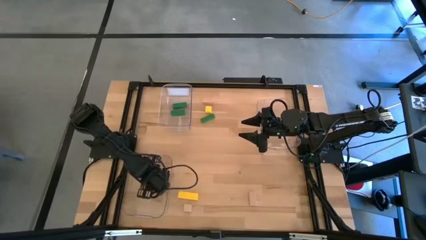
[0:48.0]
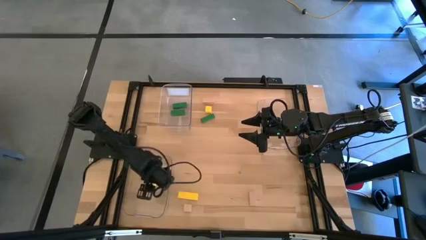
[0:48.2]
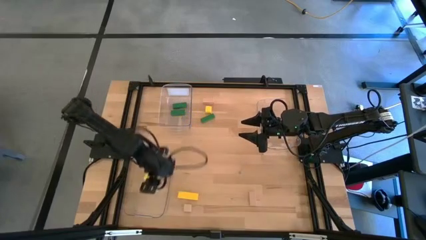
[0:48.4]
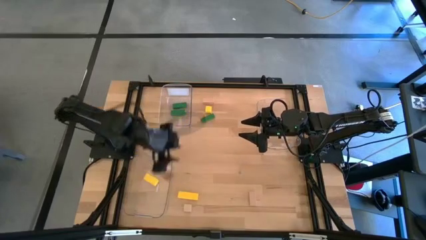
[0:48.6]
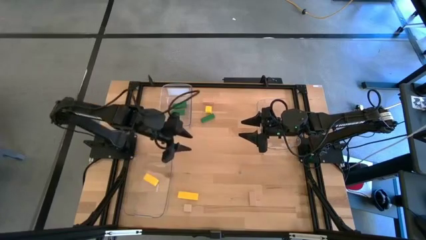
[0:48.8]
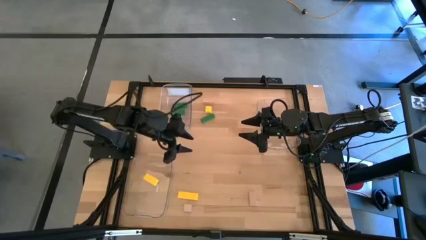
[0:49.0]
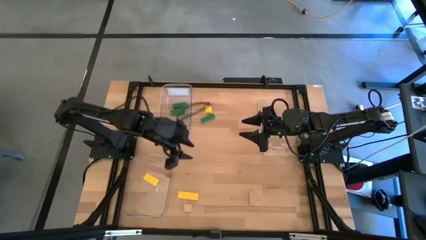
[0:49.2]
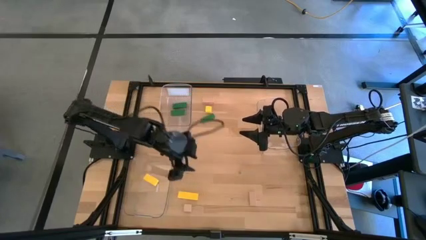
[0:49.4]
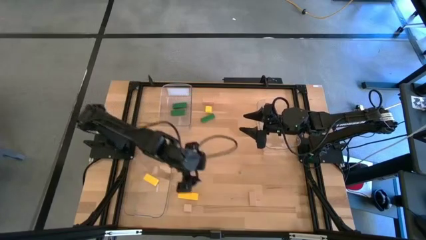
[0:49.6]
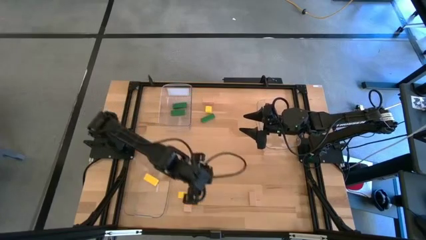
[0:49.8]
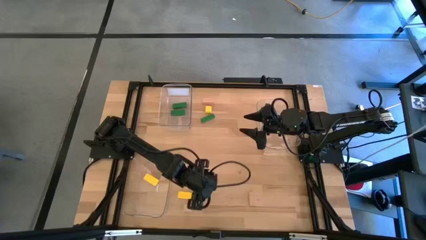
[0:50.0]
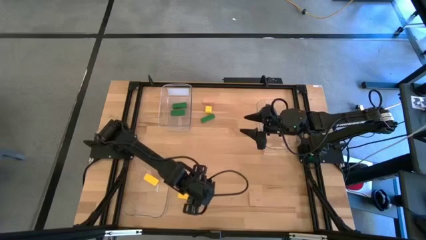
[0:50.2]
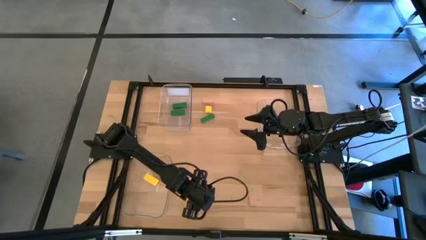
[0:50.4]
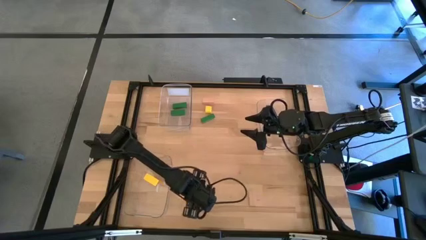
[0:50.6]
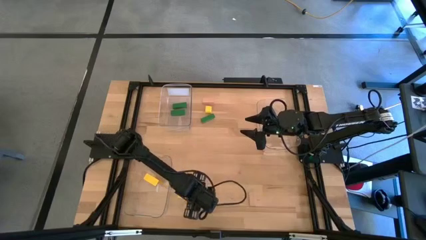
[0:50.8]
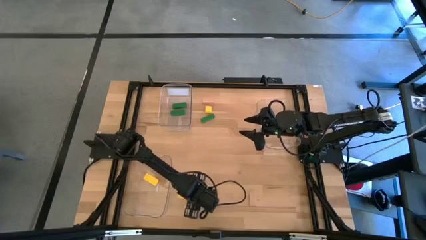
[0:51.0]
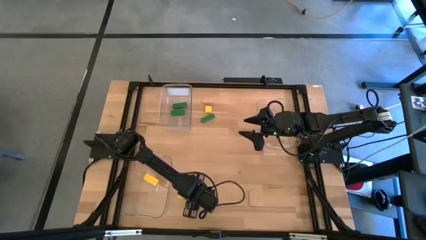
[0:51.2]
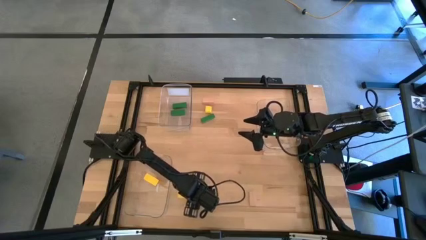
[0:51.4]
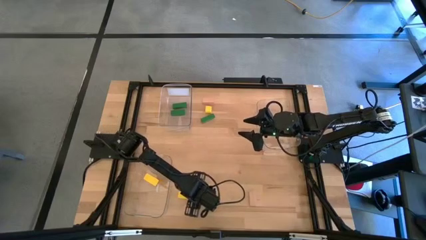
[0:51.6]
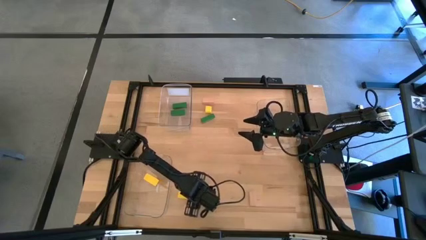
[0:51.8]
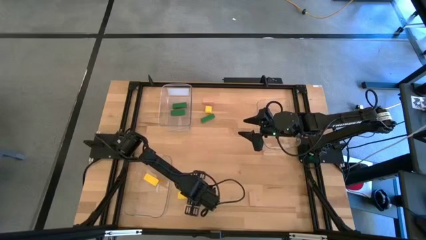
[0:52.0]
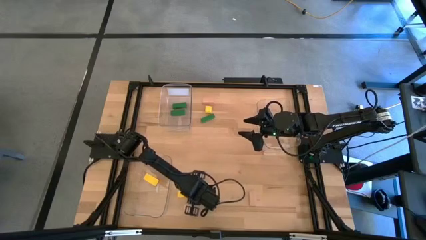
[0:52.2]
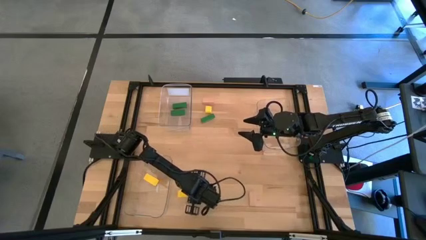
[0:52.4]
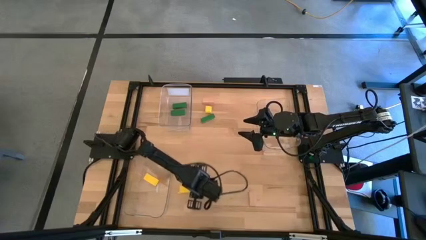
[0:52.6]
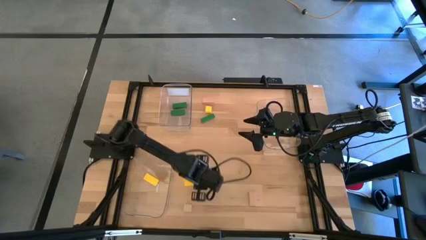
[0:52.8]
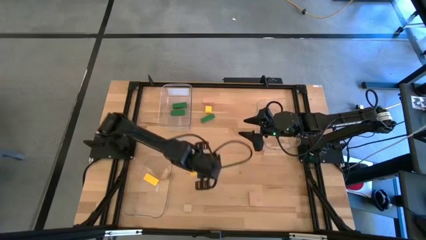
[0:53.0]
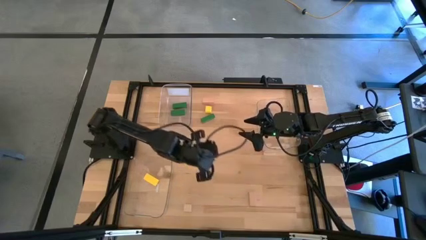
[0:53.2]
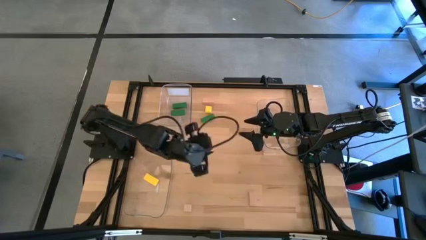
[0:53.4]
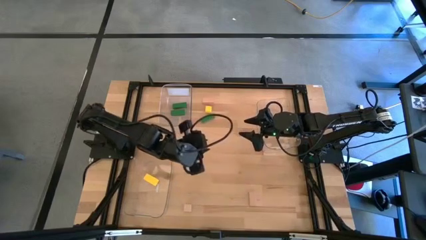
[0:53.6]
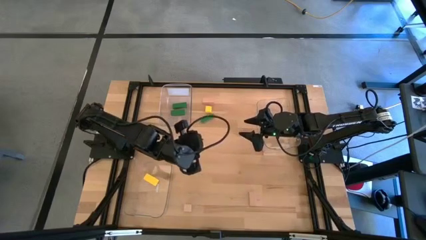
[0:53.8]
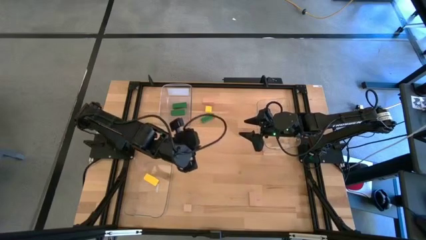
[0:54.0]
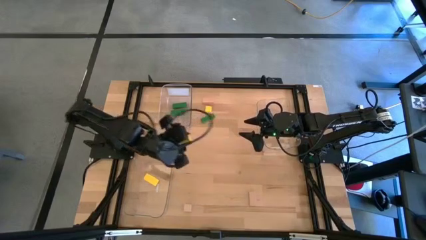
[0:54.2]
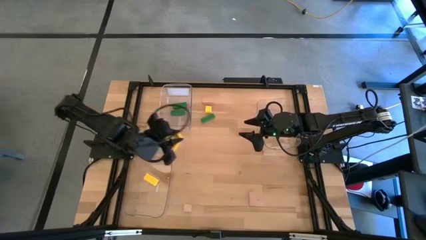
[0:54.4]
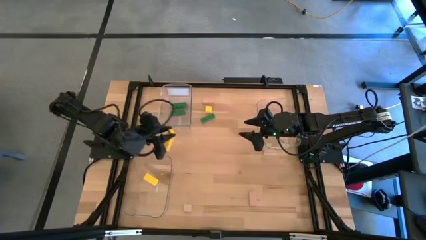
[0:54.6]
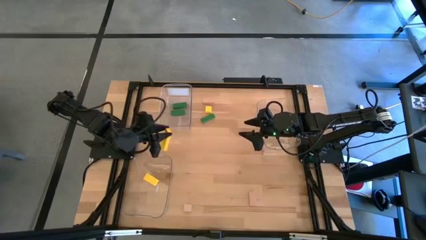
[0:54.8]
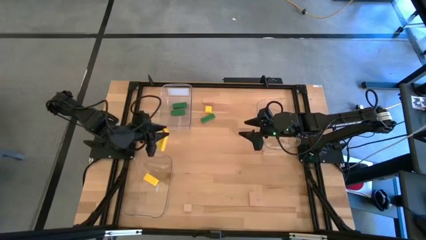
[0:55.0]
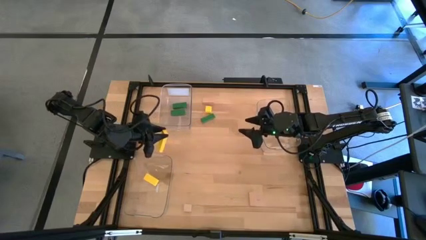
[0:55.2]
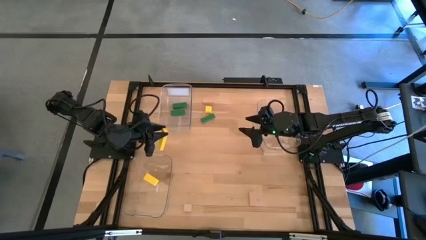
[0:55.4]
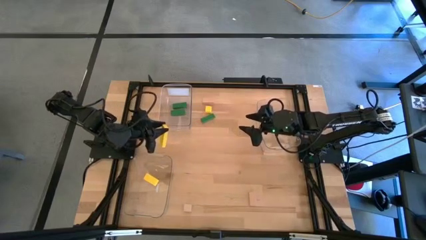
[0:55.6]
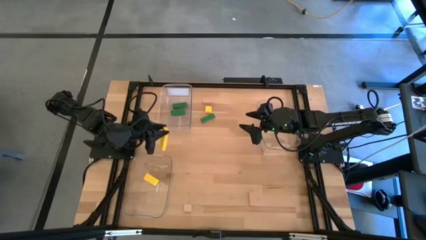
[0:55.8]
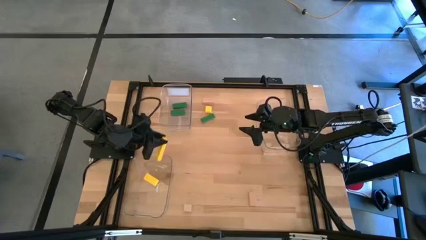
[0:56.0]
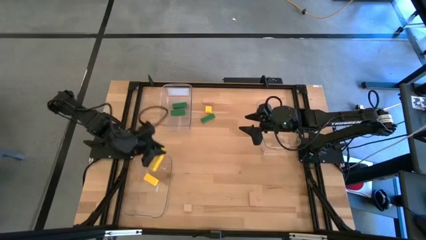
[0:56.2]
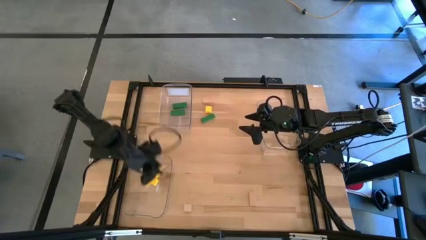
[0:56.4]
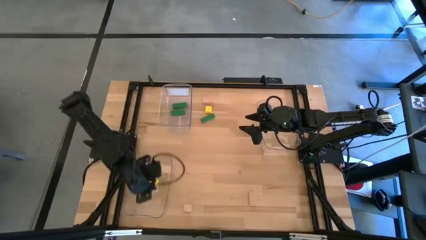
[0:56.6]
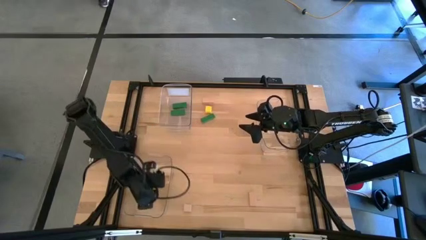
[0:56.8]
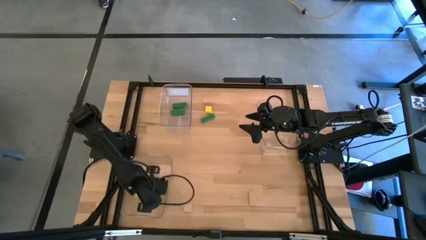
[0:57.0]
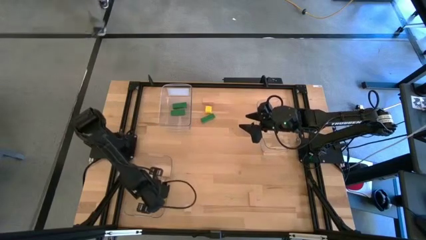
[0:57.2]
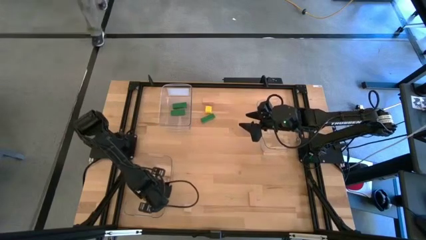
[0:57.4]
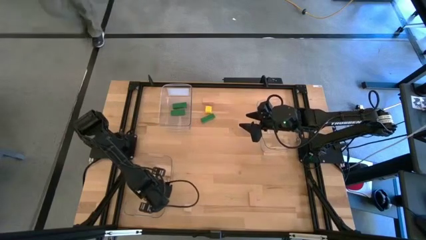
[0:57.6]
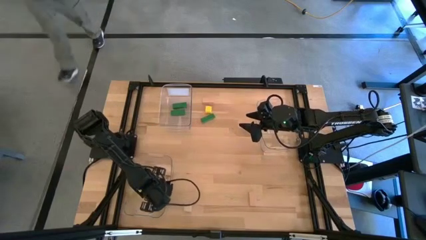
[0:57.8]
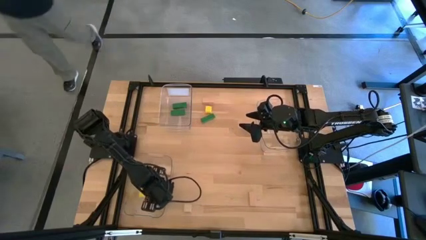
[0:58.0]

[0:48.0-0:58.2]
Task: Sort & place blocks by color
Put the bottom yellow block into the bottom left transparent bin

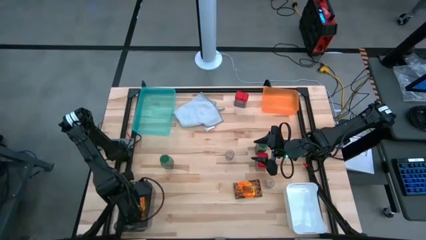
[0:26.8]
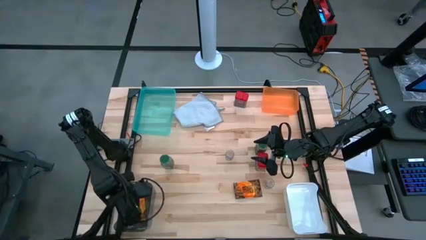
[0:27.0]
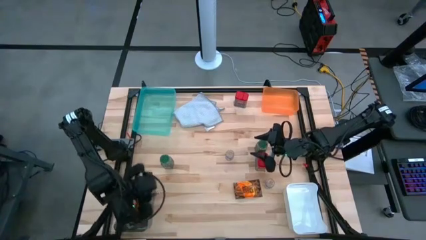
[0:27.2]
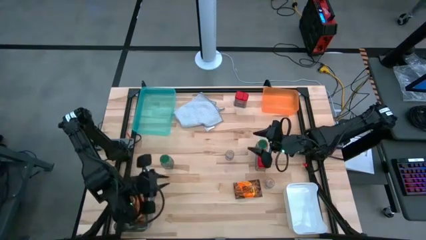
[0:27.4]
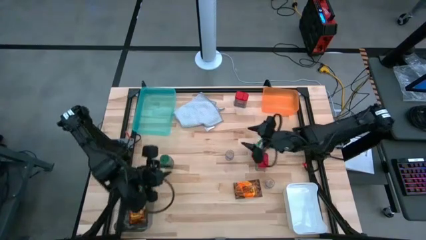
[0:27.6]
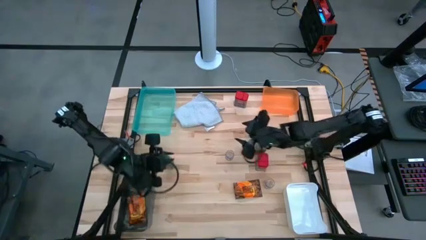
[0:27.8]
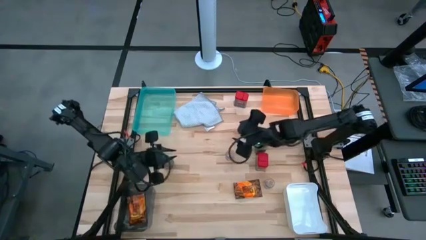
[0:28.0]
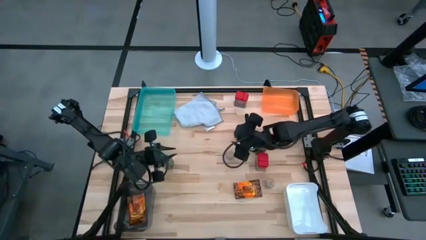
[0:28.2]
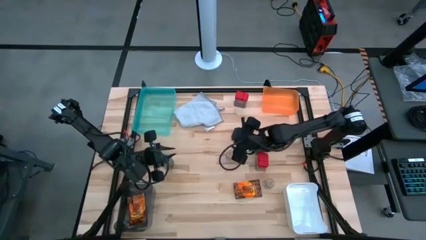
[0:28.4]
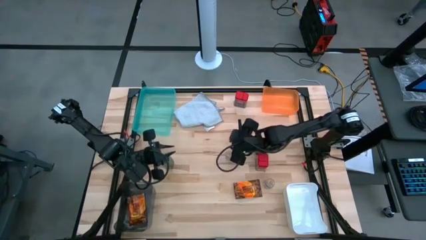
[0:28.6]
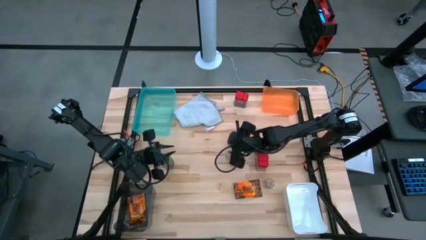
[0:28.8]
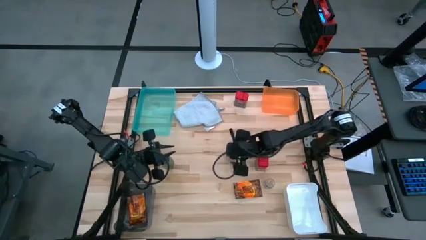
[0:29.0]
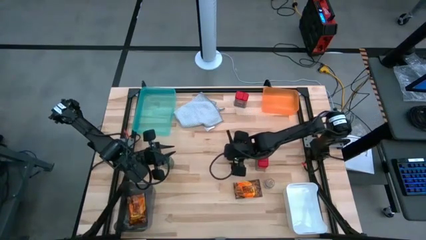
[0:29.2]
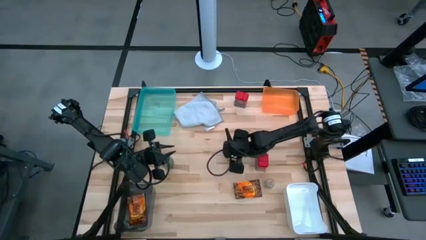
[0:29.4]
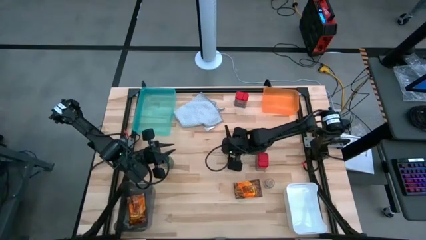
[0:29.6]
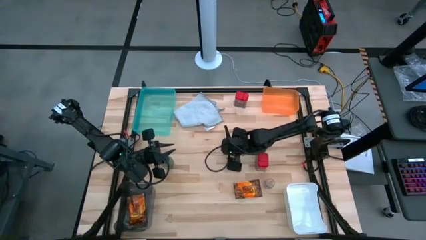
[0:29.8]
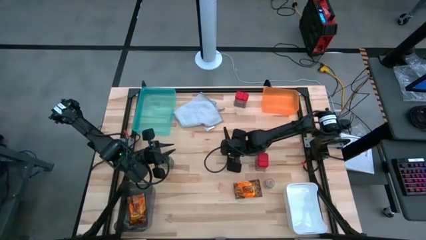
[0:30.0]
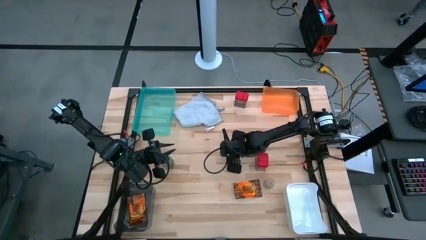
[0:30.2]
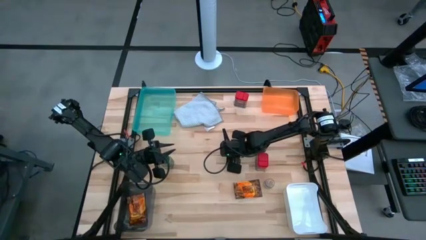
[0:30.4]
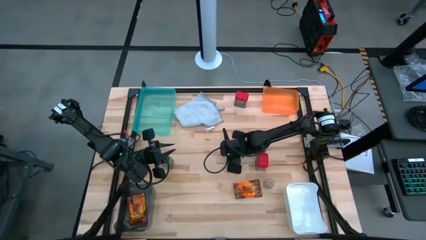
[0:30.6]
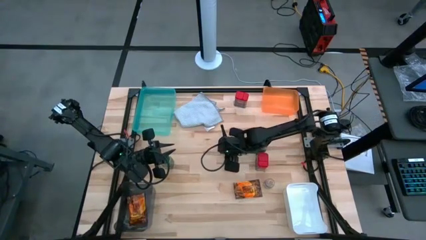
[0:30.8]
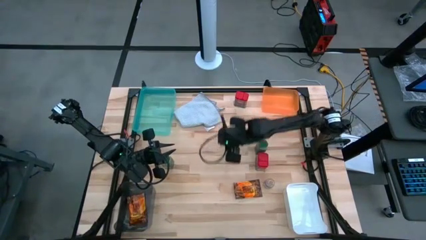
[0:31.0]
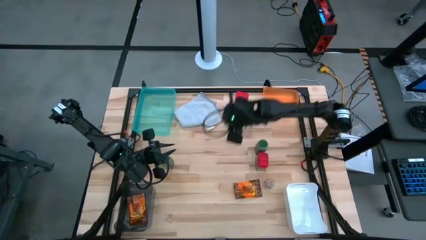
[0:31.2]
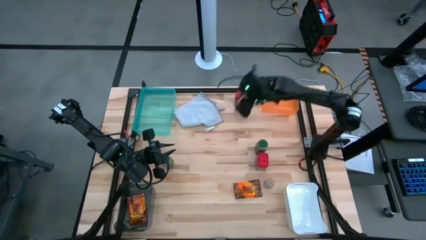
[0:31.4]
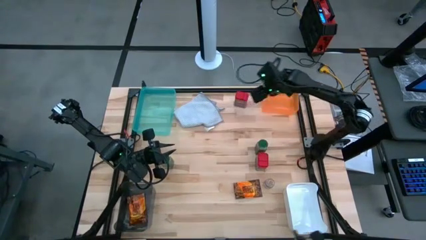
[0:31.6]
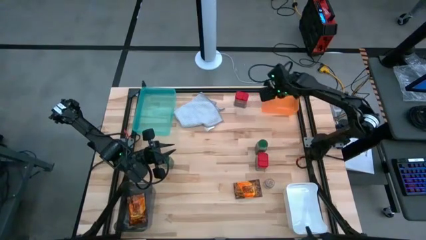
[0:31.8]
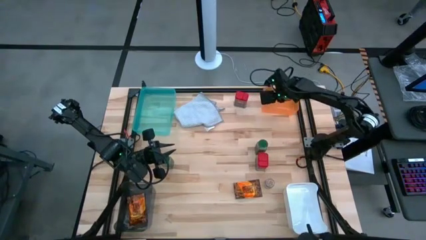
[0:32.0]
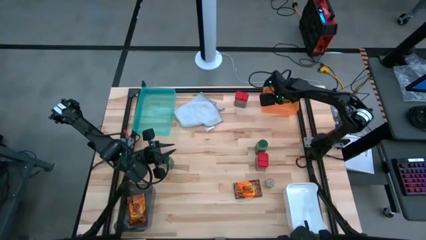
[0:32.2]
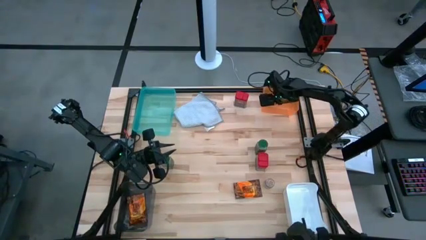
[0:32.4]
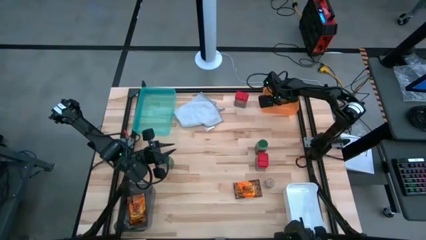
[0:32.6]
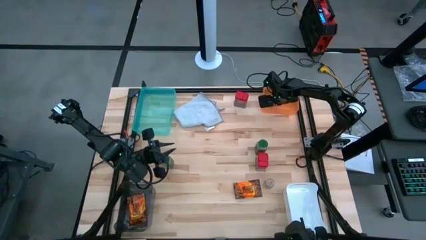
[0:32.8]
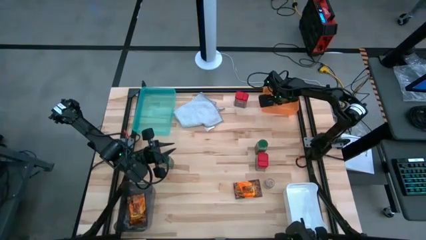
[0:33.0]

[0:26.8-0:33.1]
Task: Sort spices by type
Put the top brown seasoning bottle into the orange bin
